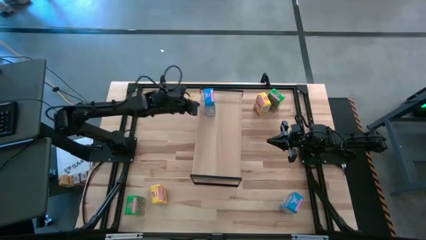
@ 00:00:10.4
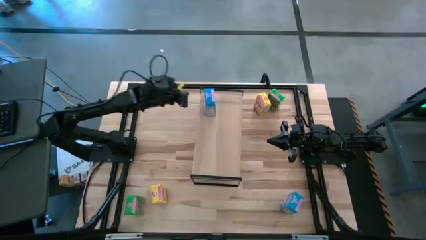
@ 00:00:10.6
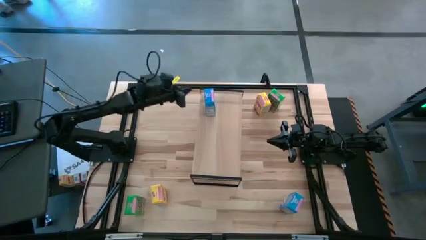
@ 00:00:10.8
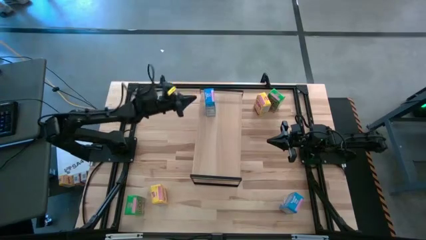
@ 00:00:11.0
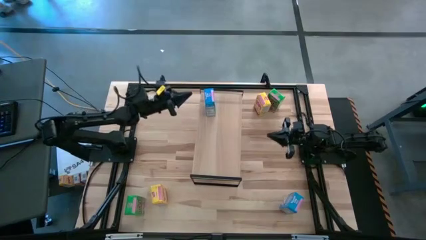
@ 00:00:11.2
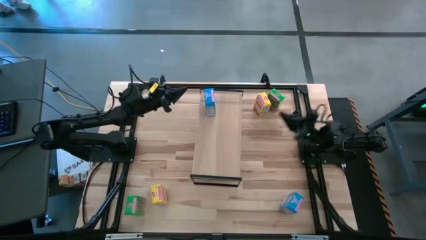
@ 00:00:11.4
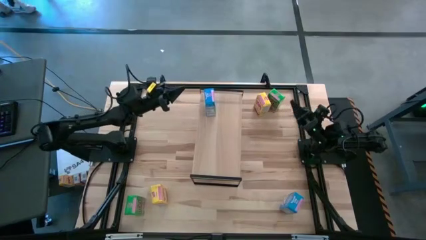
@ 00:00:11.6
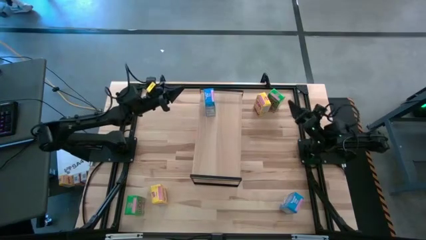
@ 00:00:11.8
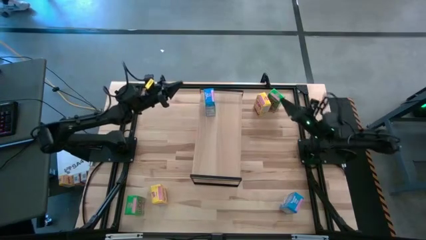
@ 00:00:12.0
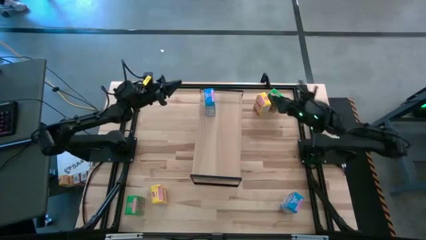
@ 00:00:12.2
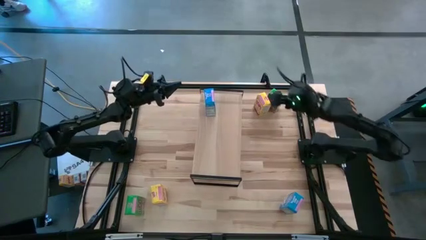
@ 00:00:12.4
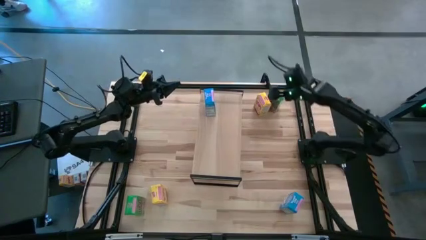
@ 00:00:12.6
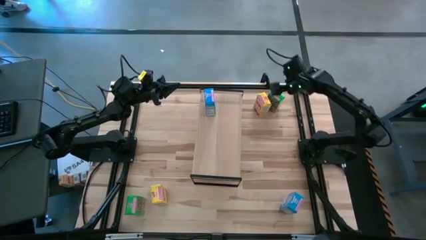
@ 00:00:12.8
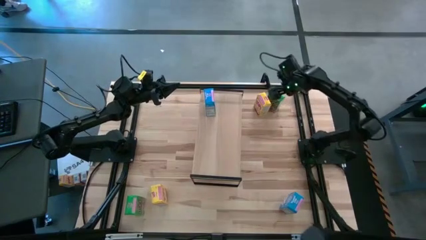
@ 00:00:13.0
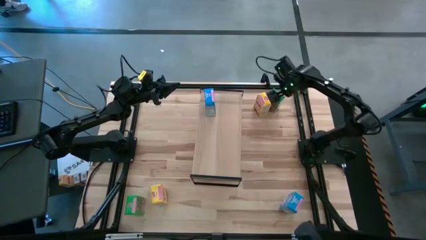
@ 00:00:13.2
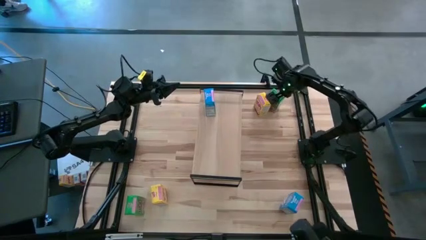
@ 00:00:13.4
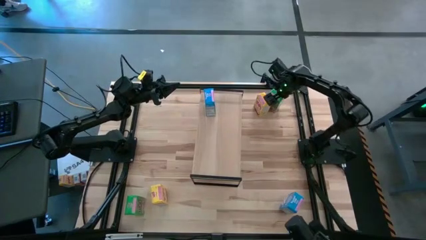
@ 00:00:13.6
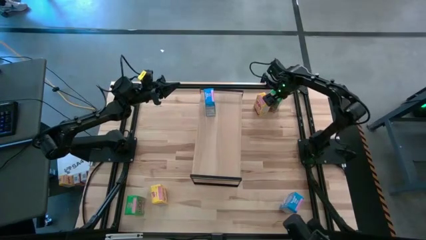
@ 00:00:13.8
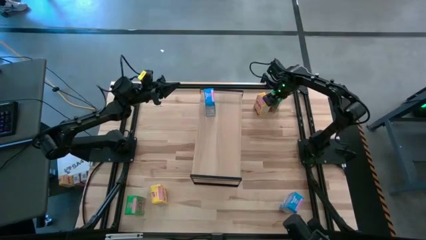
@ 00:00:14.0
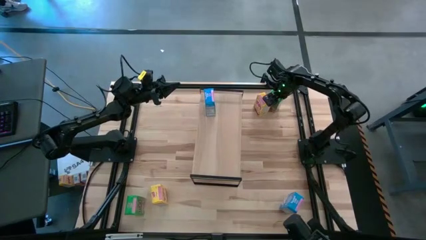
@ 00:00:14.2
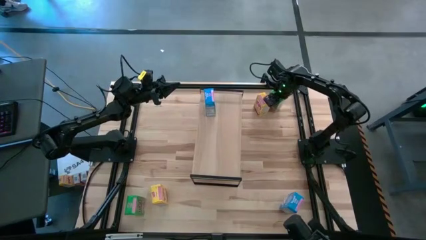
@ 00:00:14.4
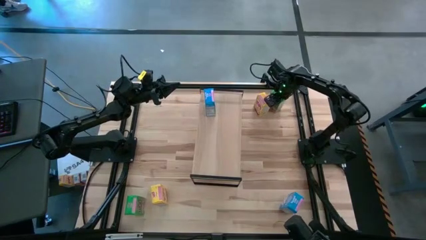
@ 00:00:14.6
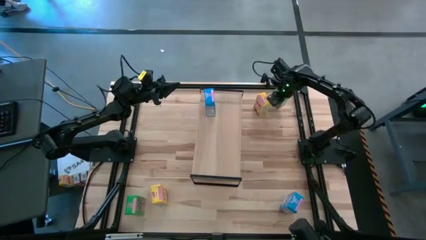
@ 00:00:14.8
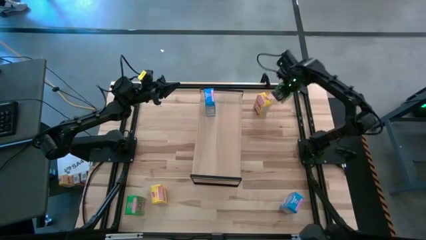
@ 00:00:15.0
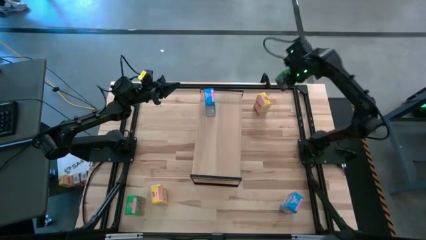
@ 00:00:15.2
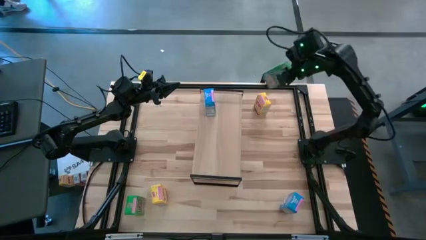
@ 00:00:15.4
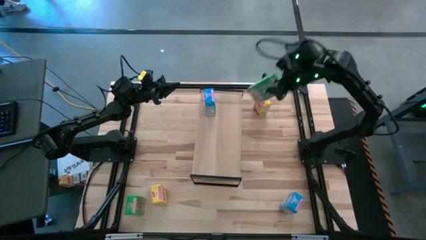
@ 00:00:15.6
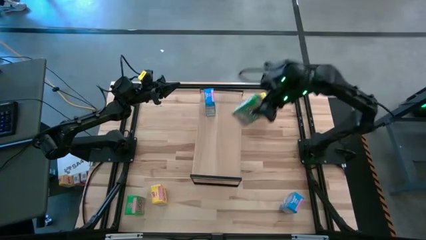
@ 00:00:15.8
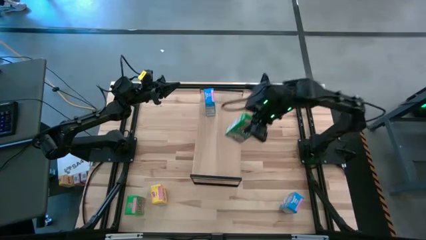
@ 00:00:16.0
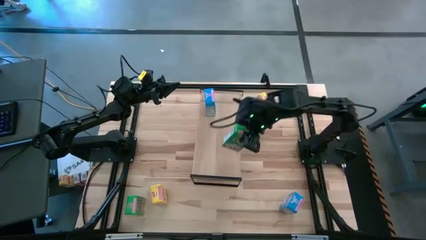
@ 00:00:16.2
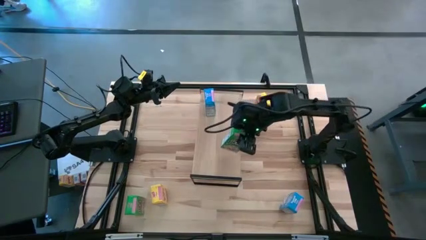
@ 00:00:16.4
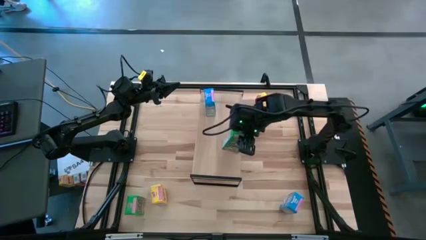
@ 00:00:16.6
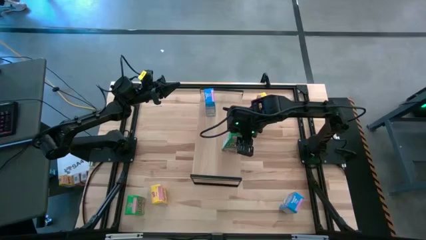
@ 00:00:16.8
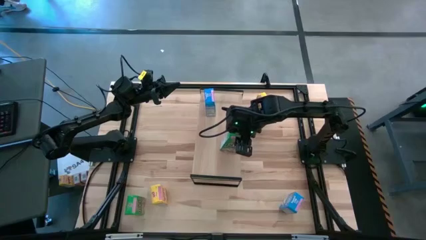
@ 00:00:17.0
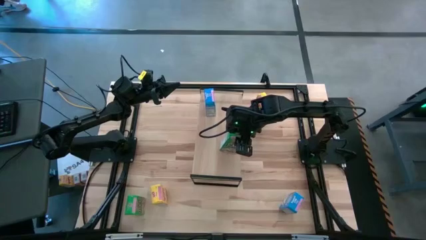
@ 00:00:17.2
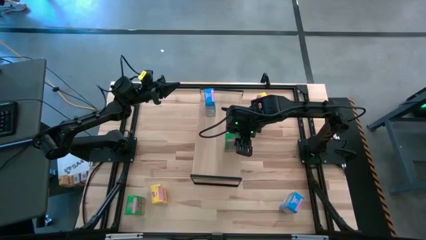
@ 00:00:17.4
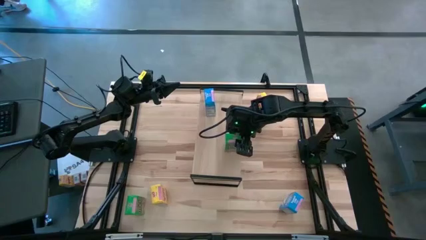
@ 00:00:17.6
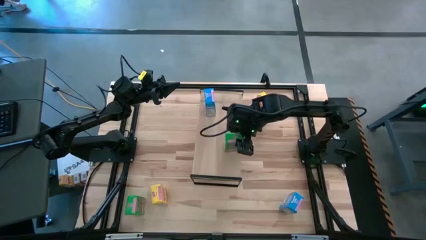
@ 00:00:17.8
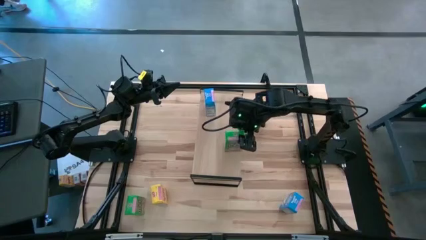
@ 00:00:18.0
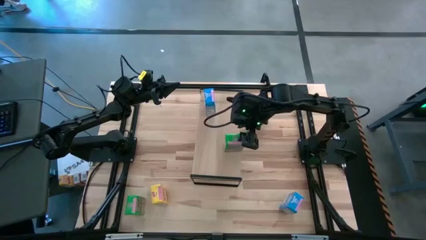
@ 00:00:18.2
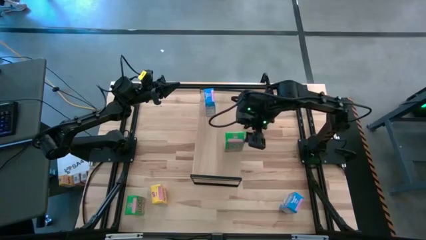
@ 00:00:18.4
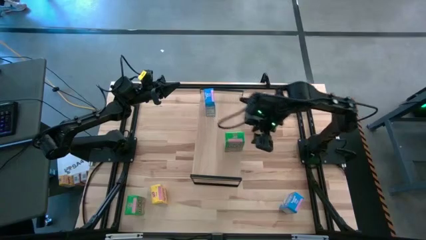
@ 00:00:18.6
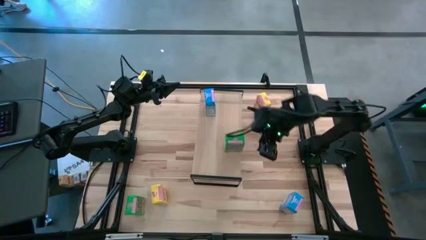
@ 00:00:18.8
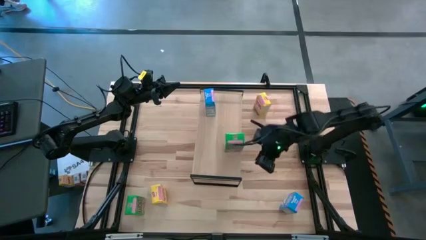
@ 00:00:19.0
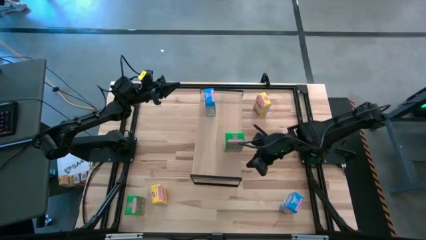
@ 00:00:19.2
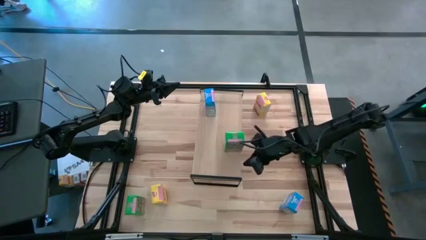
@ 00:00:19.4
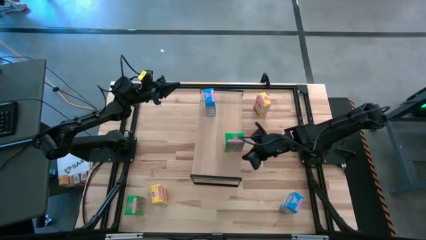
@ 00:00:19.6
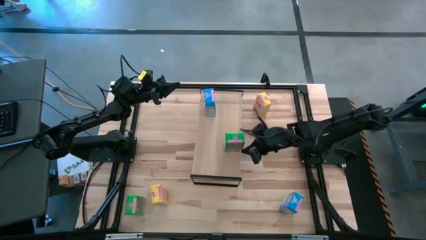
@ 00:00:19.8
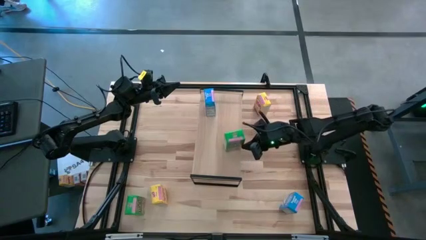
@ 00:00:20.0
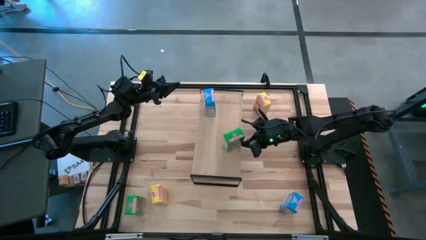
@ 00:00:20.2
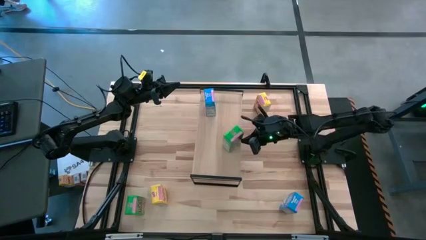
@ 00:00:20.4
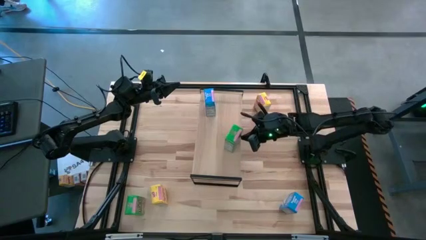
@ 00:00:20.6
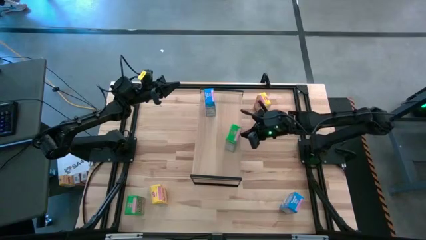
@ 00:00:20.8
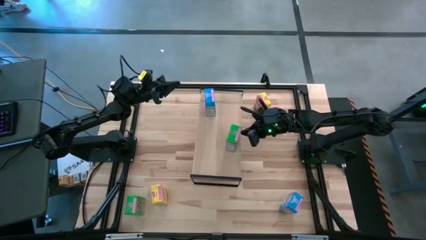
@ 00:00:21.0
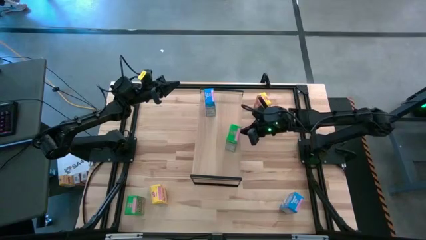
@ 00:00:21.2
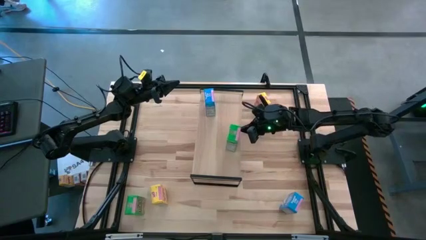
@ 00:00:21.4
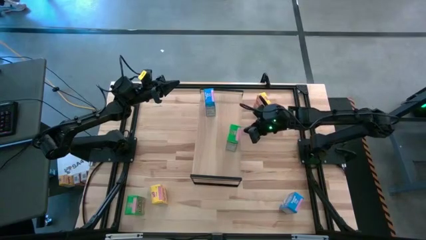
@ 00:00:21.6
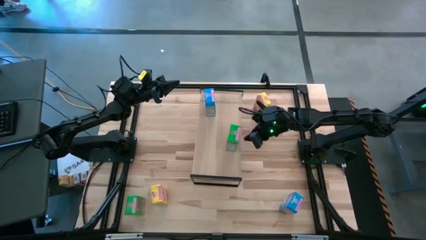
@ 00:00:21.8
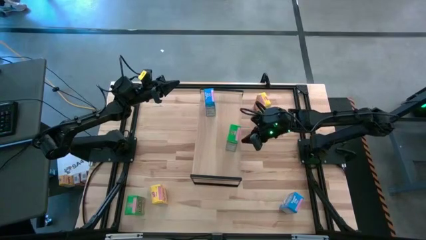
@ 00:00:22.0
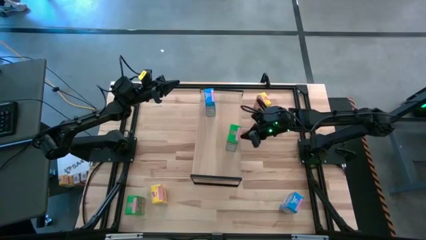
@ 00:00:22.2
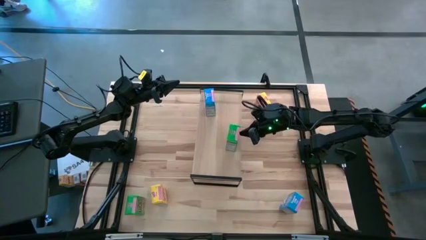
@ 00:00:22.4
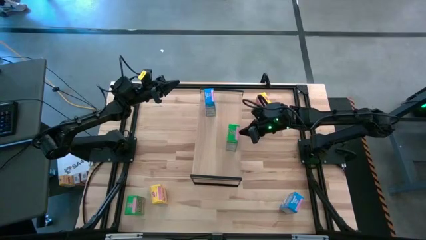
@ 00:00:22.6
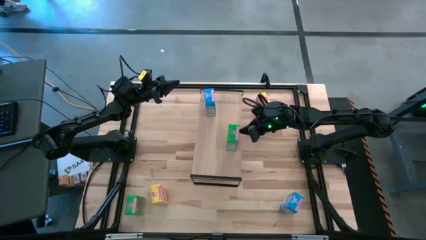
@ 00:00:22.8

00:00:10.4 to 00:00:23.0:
Task: Stack cereal on shelf
Put the top green cereal box on the shelf

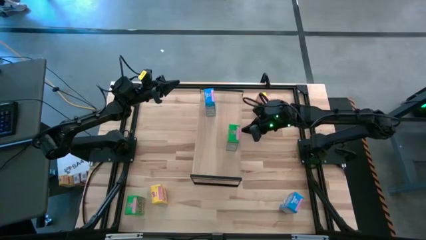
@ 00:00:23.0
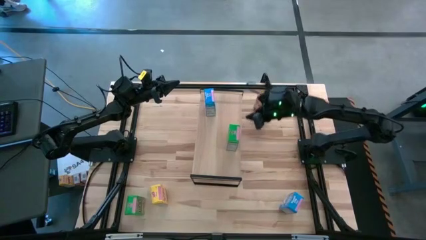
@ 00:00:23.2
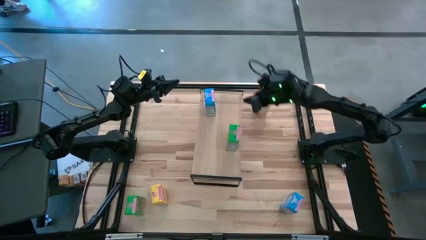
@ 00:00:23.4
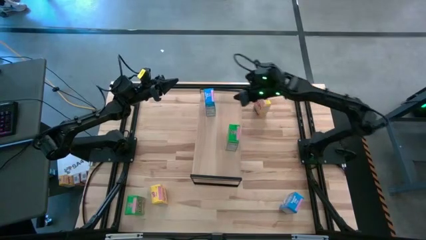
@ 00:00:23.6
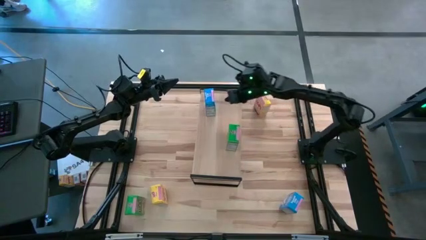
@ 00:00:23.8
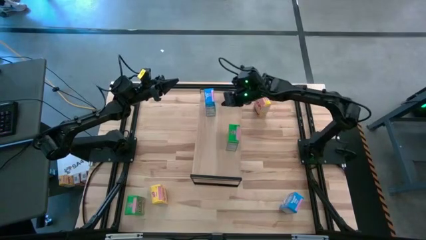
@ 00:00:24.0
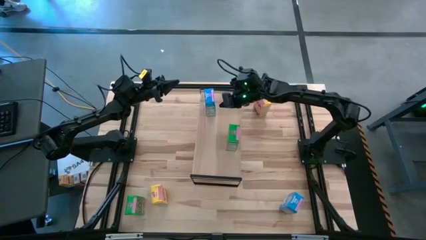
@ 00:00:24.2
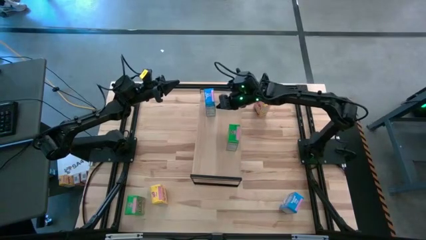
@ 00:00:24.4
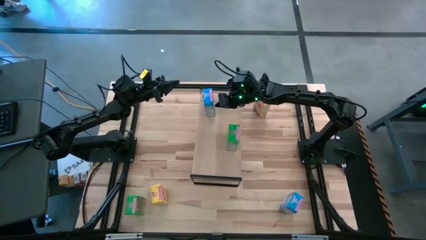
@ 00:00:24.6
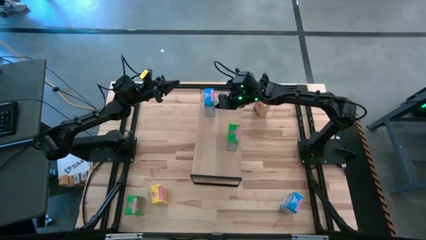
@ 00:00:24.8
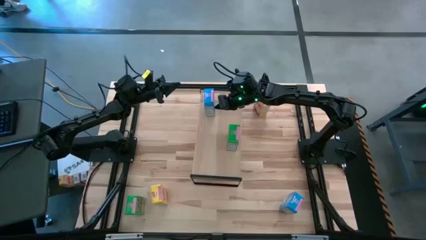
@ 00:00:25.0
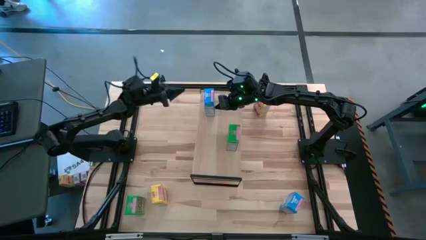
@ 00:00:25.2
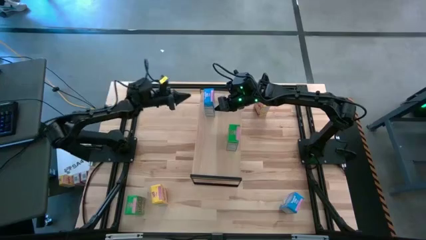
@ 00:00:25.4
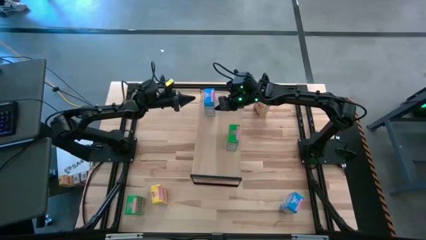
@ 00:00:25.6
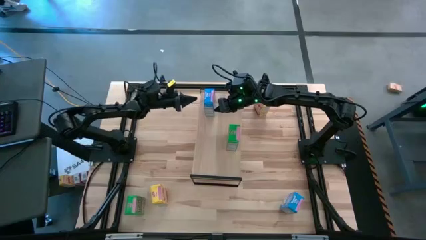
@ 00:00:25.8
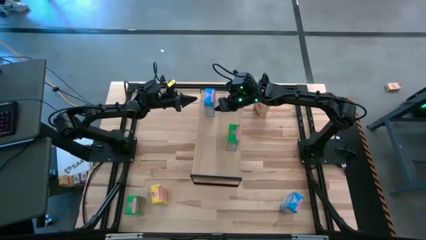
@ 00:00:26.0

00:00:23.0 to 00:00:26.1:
Adjust the blue cereal box on the shelf
